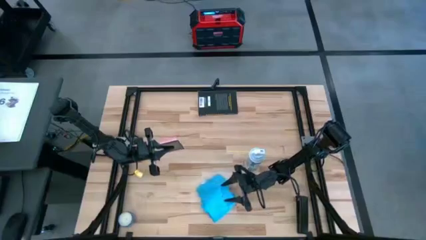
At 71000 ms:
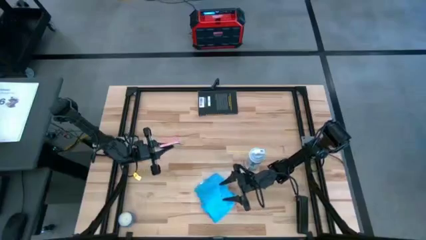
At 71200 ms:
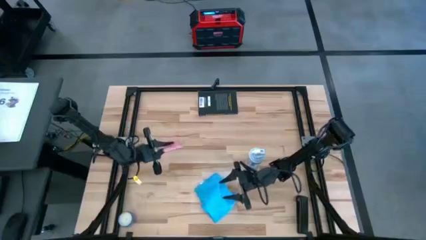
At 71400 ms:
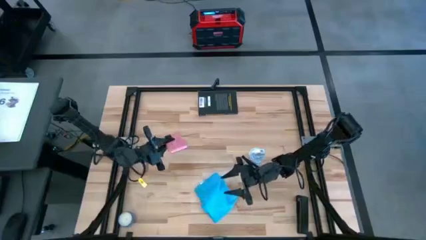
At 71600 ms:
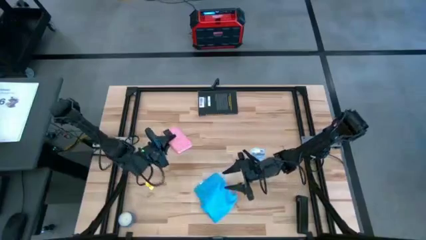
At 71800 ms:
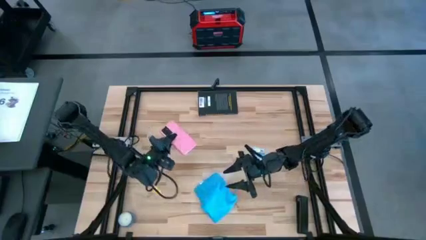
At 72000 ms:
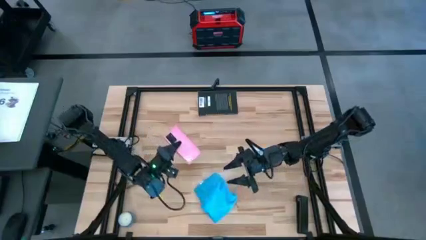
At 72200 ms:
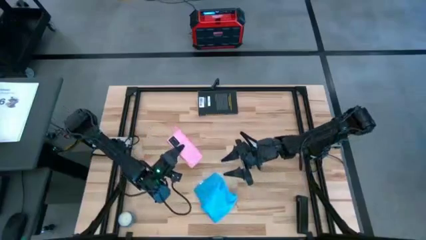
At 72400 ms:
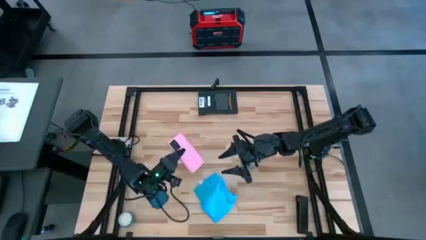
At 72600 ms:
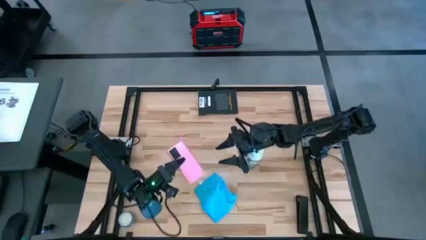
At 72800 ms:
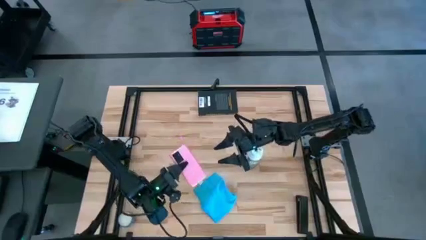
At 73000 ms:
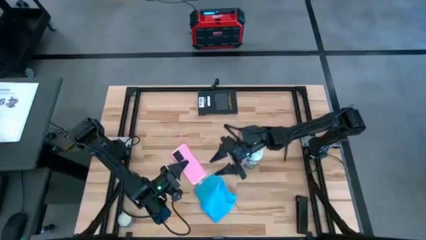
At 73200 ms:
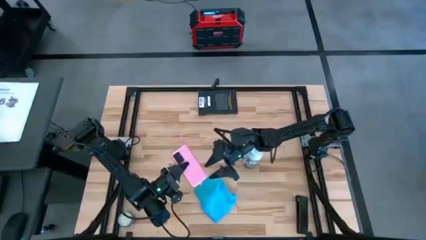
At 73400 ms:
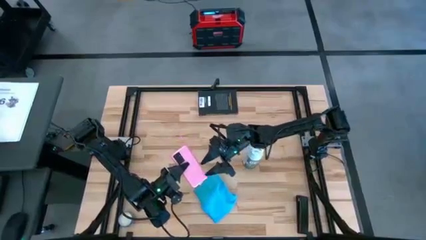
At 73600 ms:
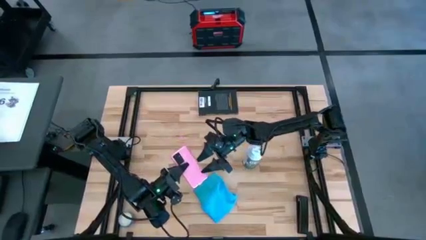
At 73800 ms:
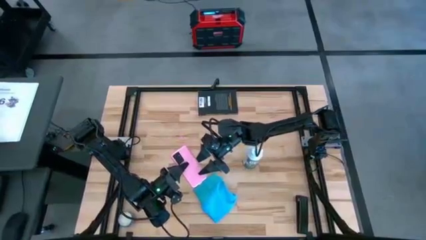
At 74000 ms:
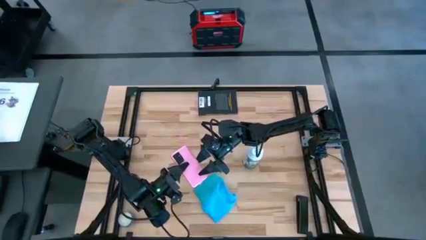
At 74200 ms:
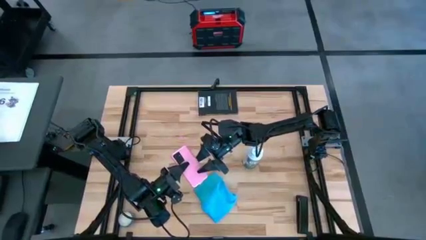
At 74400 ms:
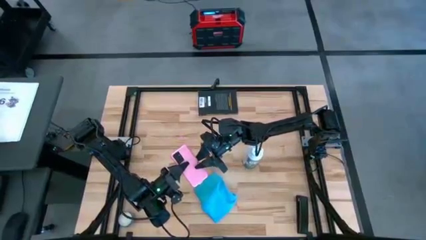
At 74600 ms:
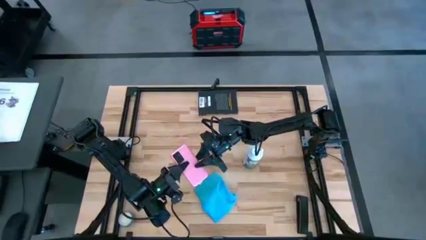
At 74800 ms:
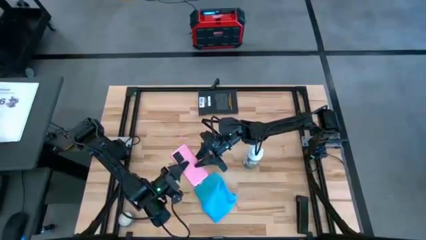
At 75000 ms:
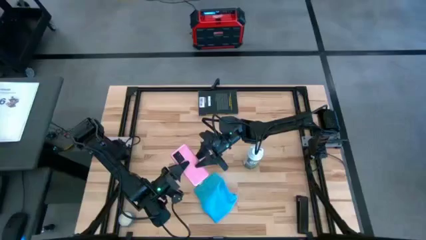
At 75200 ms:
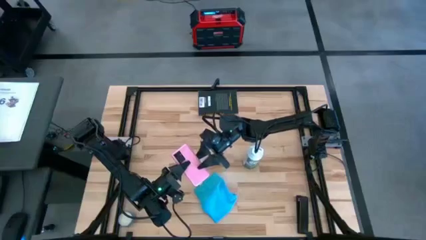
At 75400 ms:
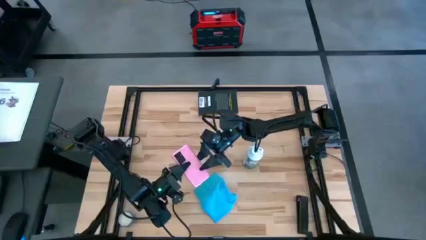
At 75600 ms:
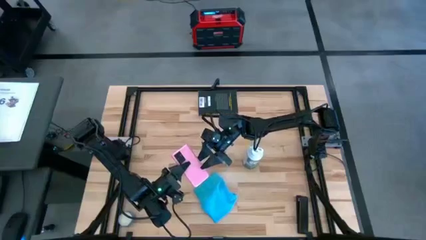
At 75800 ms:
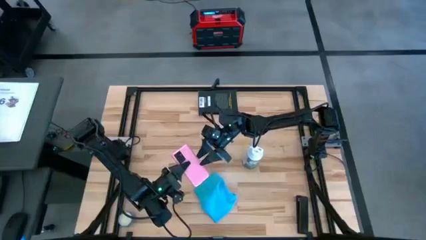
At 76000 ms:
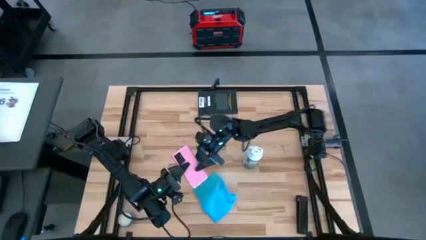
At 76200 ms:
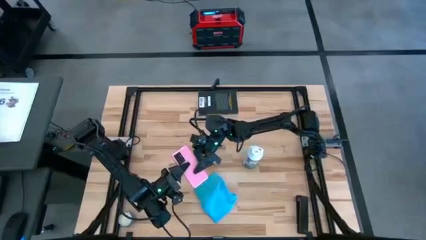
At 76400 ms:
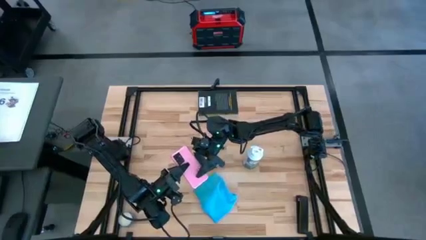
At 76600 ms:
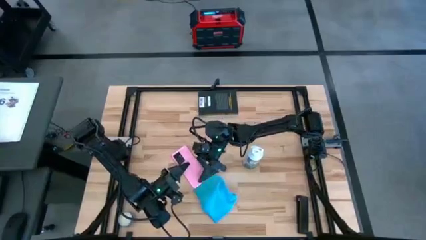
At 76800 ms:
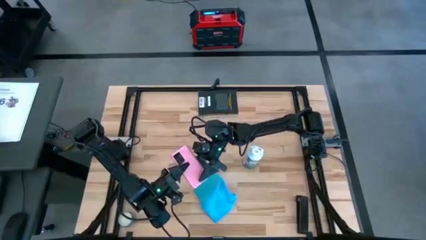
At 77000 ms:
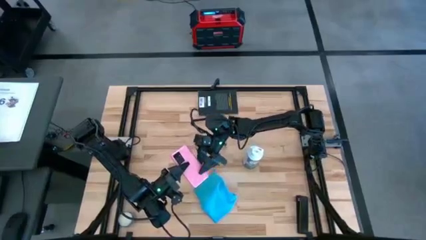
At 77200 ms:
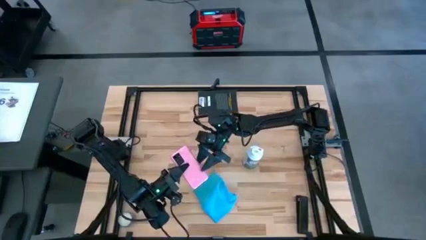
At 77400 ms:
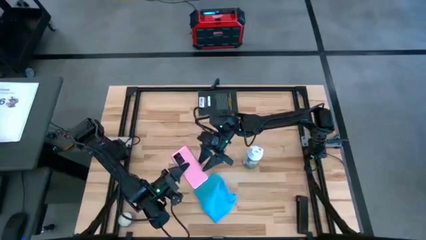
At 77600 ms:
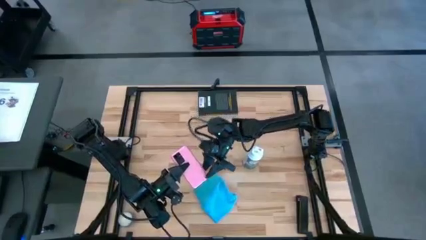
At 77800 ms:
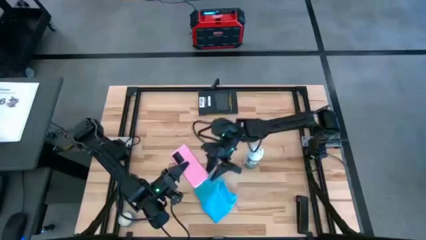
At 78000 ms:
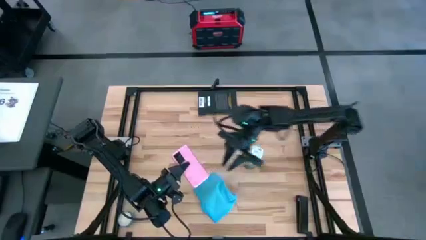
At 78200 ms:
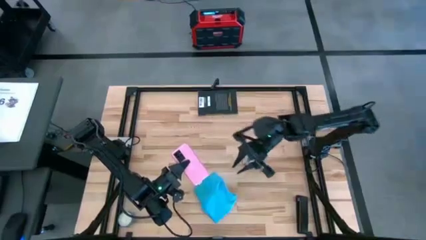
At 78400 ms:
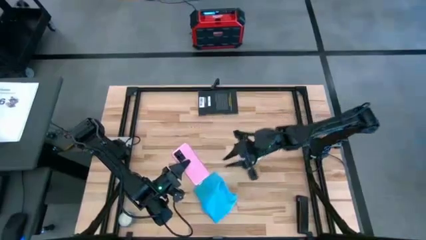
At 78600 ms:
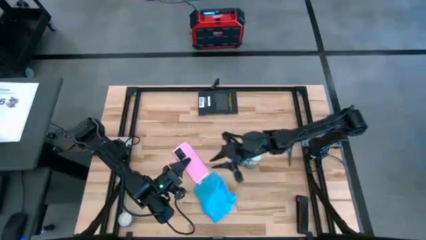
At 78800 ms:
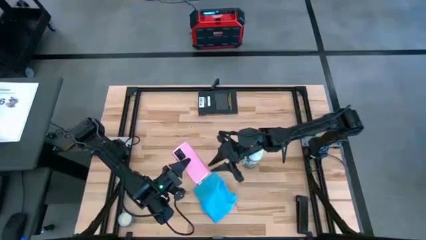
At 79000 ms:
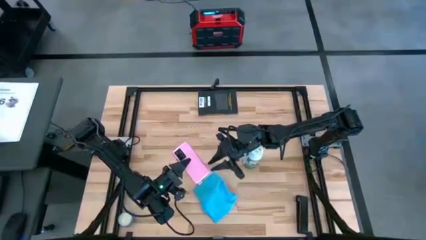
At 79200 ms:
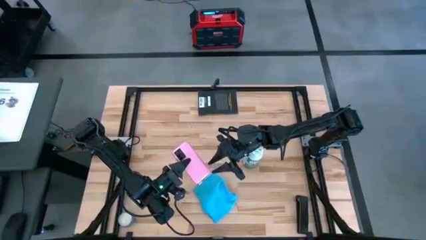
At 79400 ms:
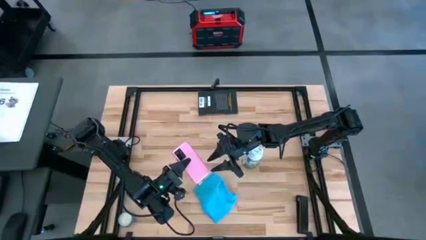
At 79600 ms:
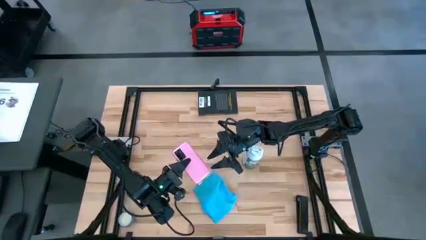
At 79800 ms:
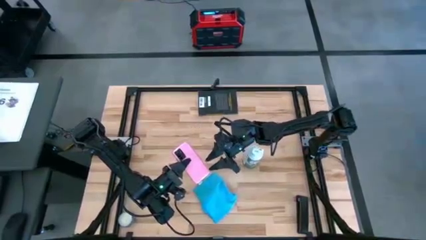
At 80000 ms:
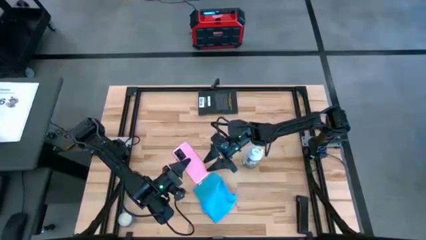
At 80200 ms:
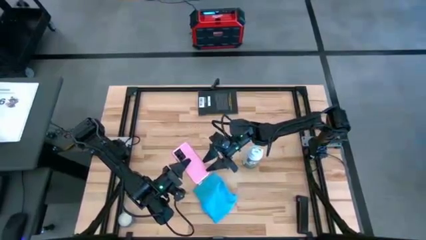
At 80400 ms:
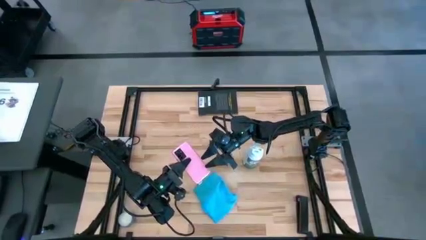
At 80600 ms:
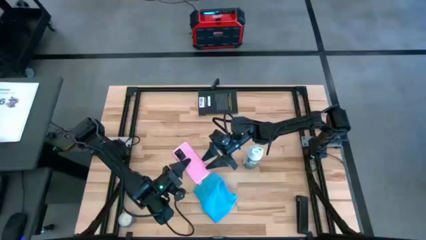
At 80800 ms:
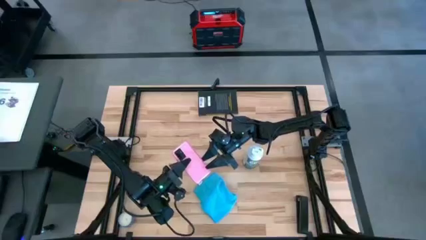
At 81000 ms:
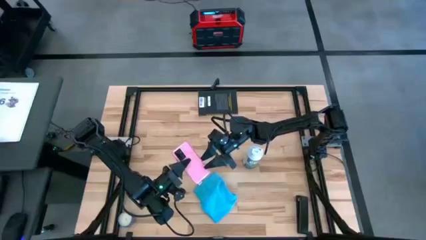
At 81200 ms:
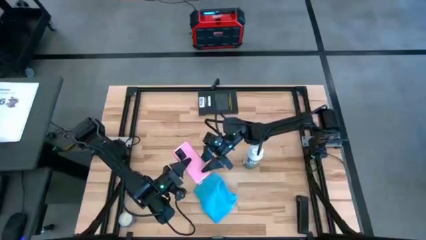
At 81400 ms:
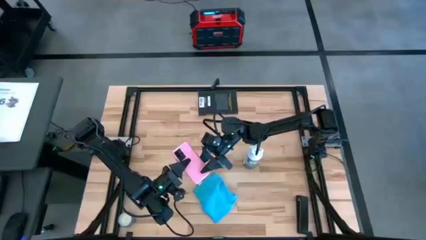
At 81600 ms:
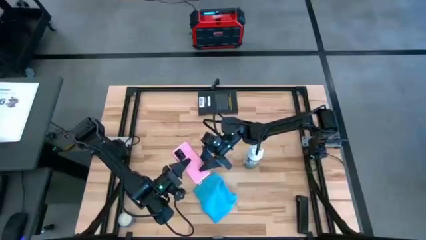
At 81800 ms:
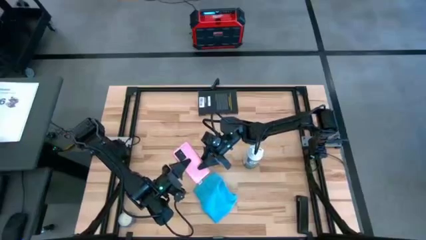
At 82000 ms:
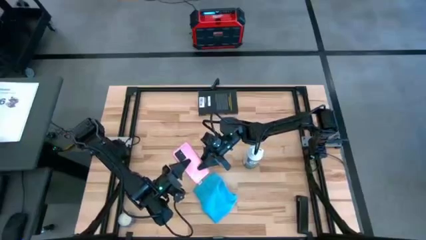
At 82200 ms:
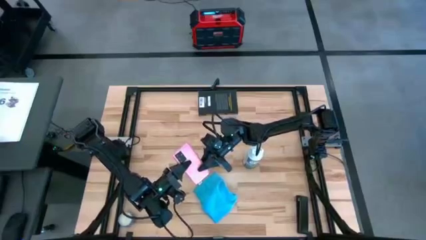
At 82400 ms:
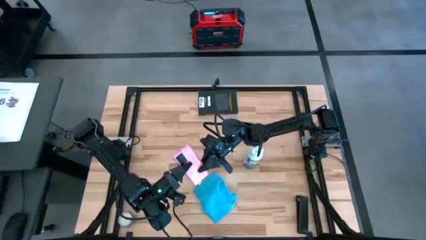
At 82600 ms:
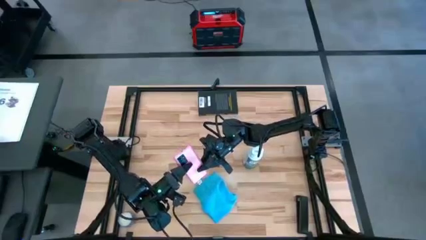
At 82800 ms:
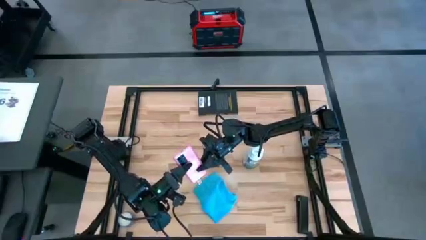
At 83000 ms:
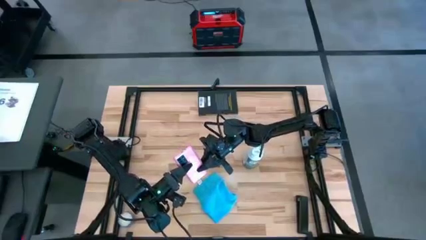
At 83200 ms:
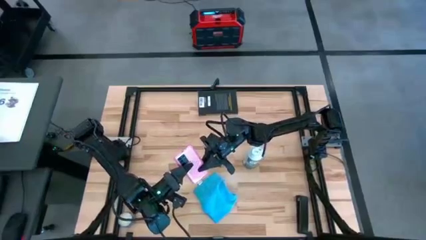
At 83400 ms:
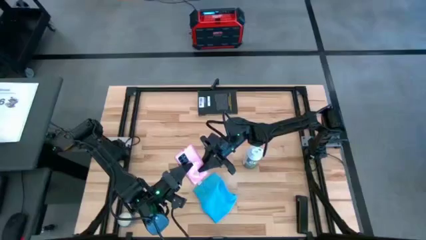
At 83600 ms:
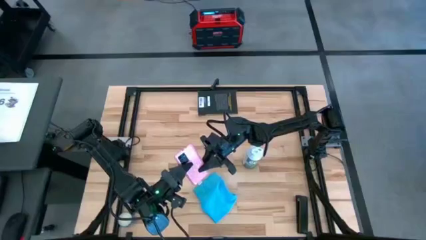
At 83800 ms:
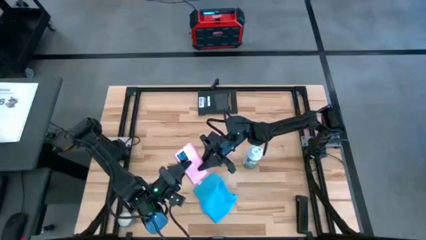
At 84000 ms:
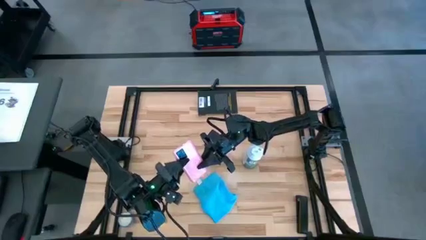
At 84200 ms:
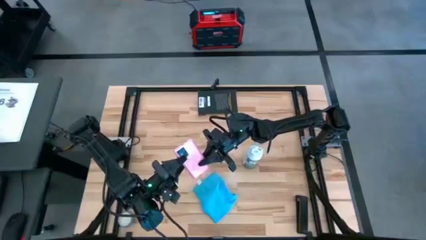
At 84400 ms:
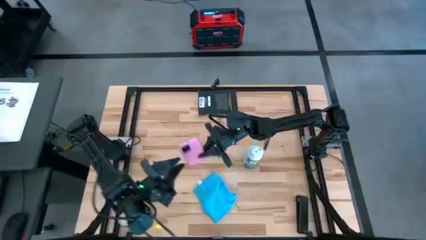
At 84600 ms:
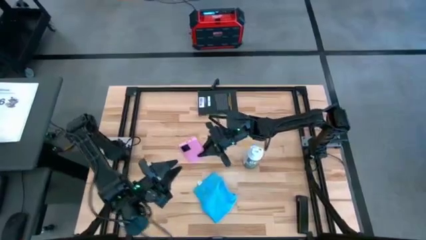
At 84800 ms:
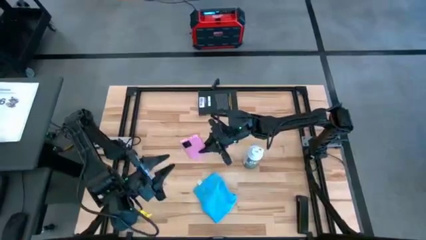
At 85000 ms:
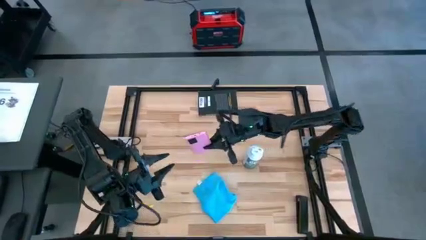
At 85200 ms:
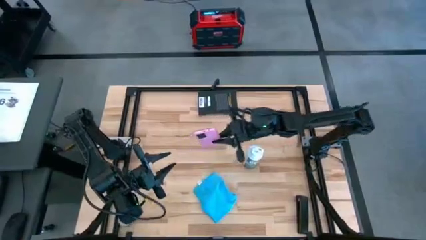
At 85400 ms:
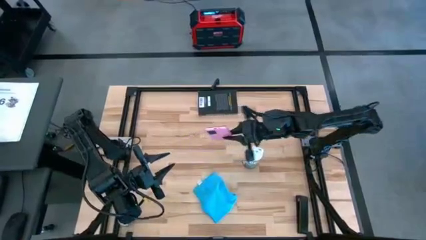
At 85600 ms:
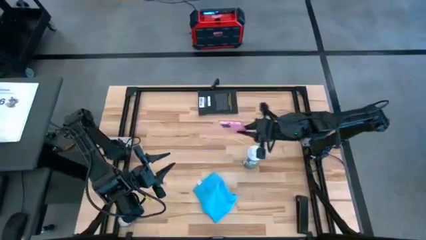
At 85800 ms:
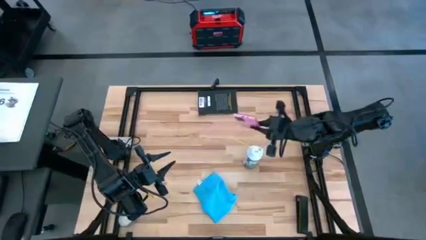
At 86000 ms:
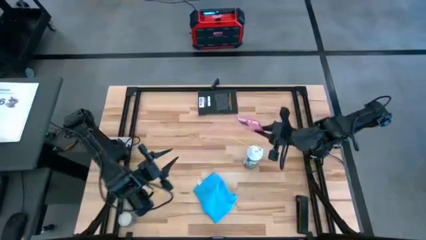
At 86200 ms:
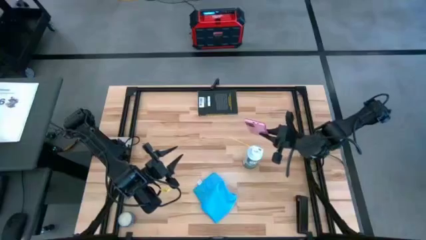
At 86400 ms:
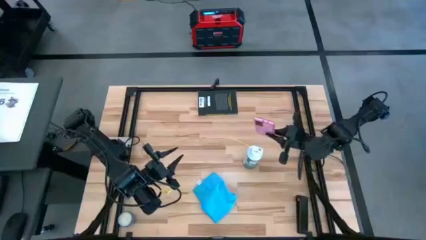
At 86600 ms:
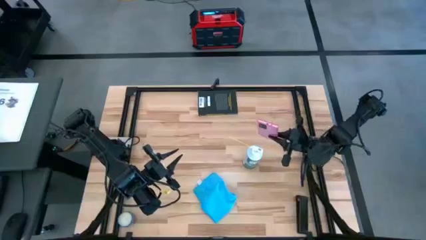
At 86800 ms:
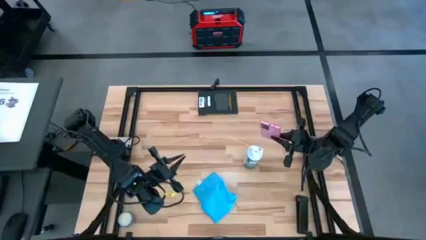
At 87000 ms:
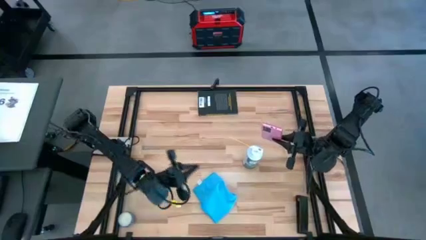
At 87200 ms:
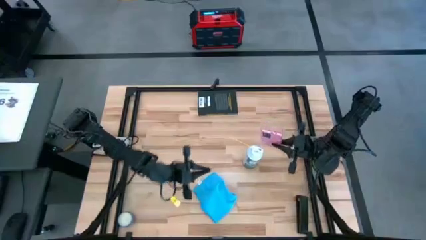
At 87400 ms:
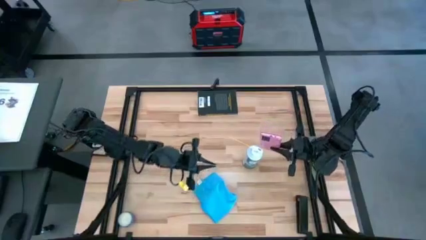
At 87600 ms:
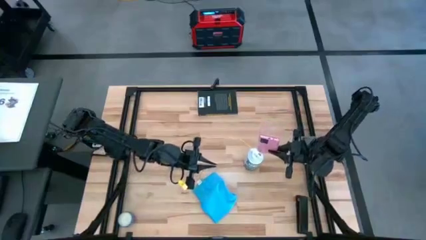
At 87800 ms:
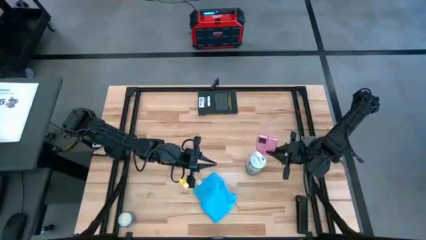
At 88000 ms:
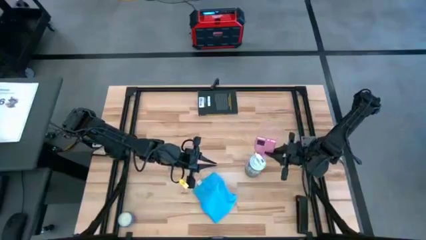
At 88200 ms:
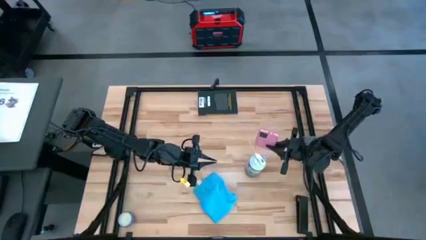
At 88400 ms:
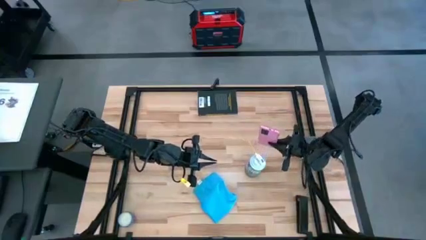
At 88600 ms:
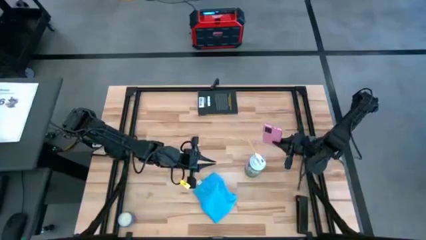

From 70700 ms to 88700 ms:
Task: Apply microfiber cloth
Spray the back of the cellphone with the spray bottle
